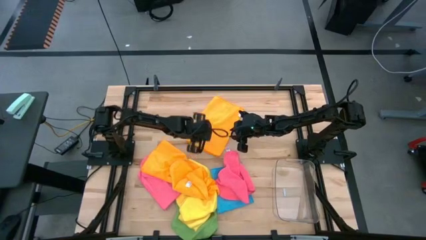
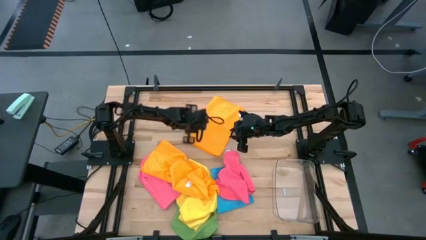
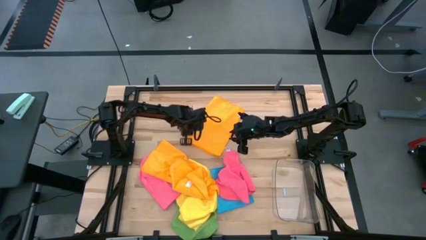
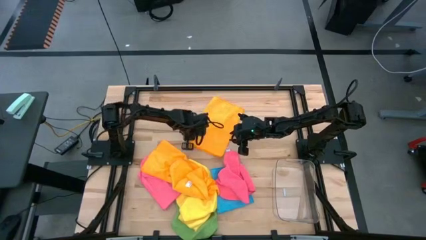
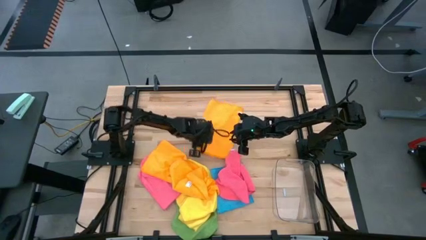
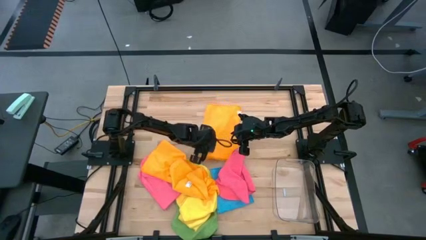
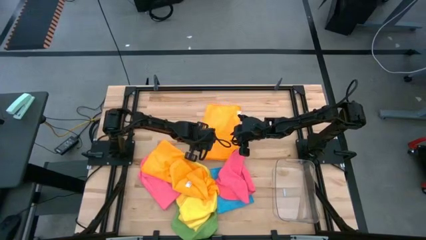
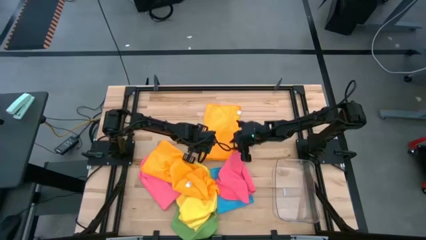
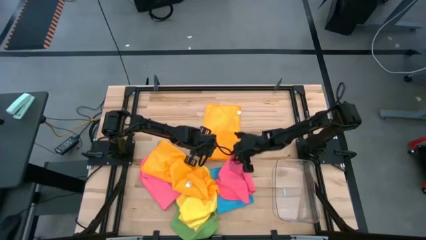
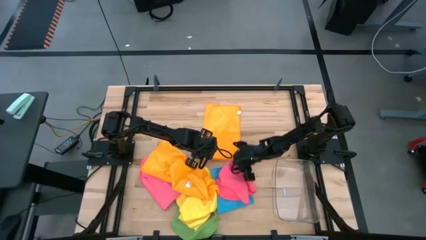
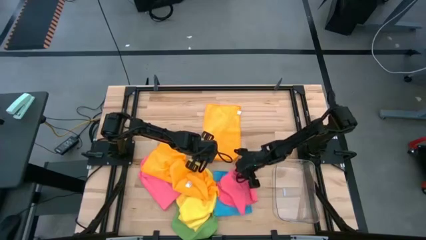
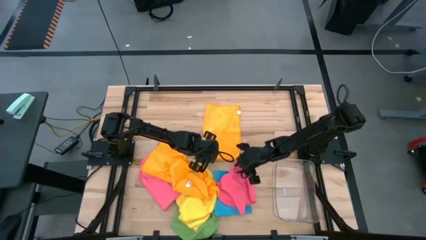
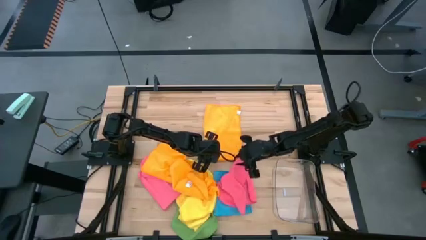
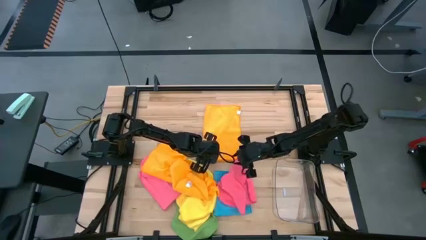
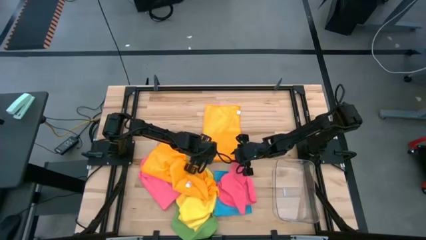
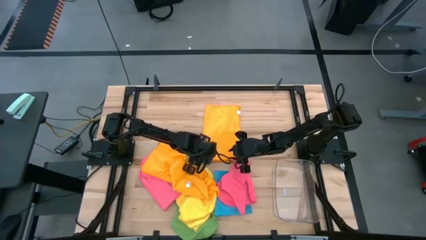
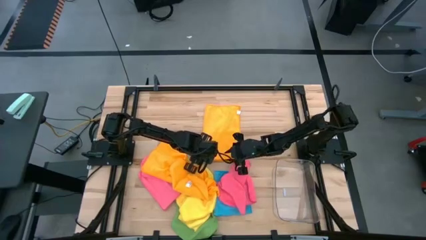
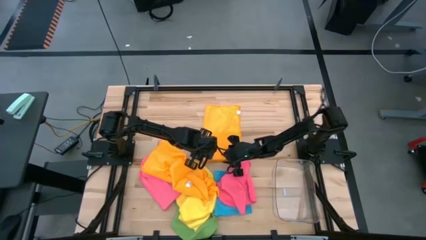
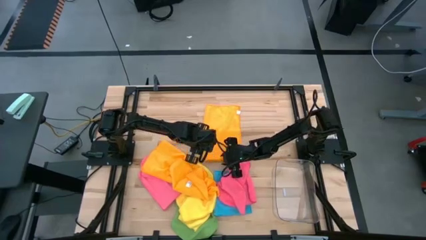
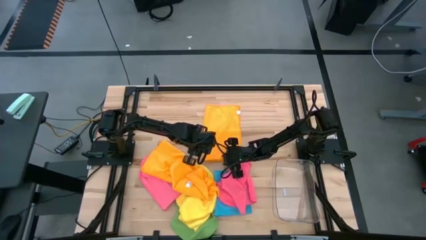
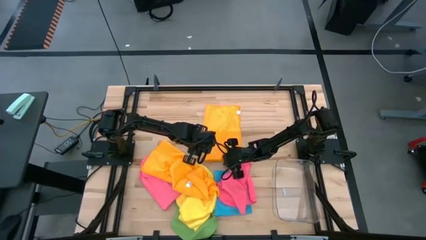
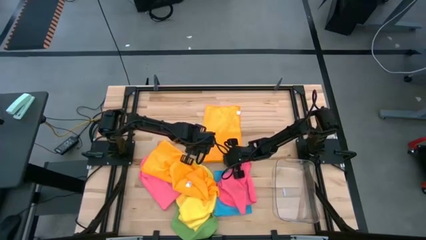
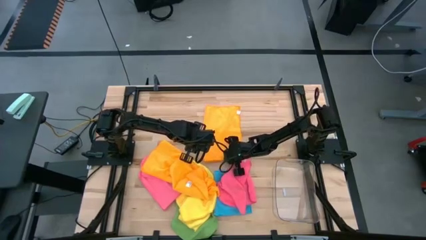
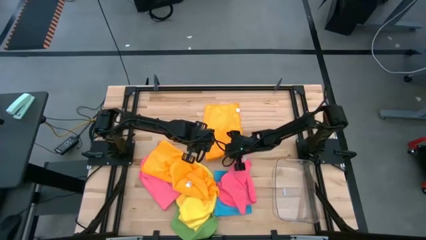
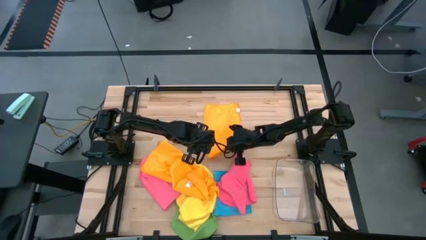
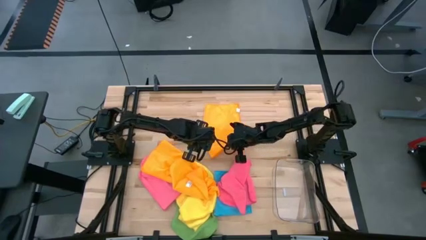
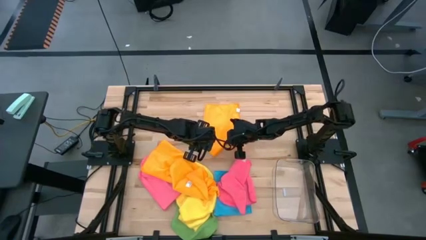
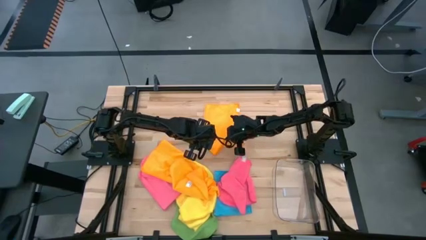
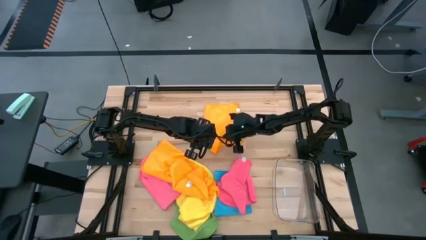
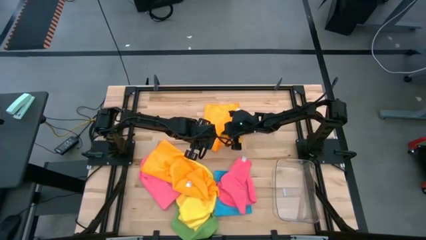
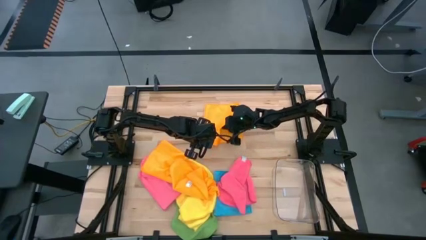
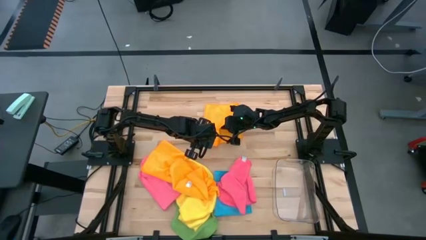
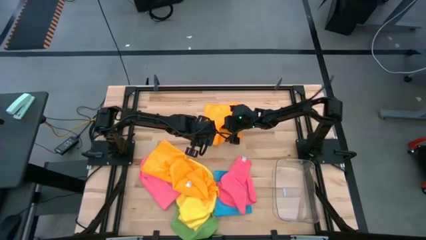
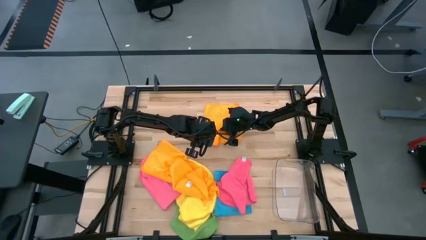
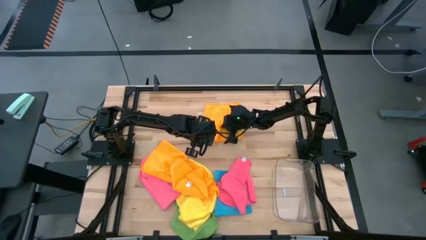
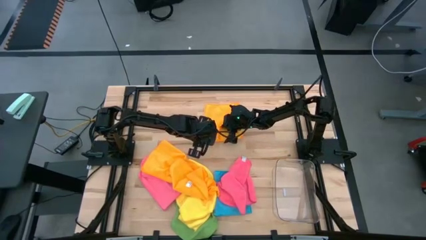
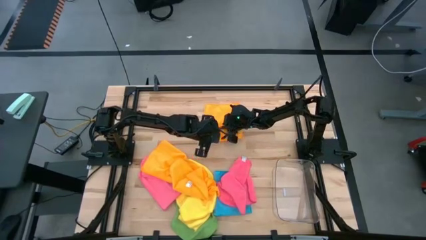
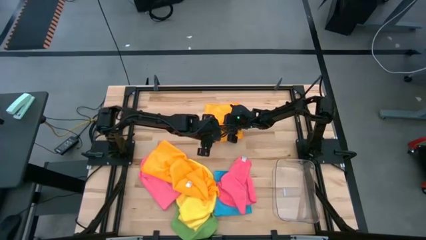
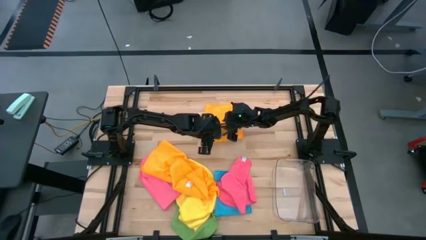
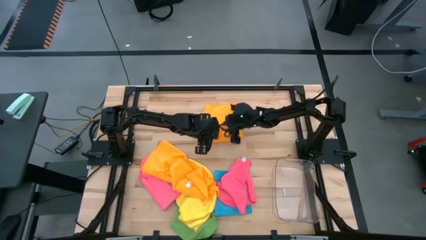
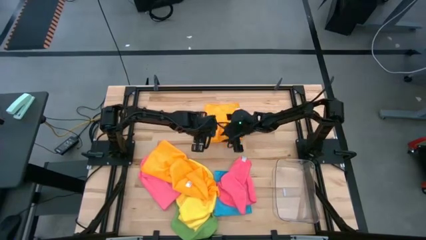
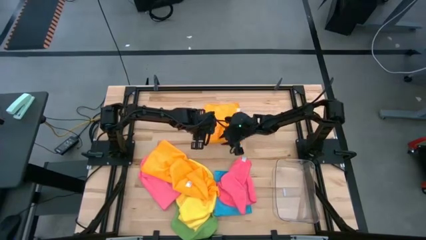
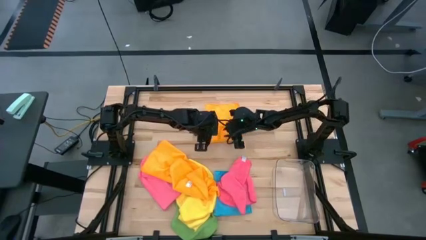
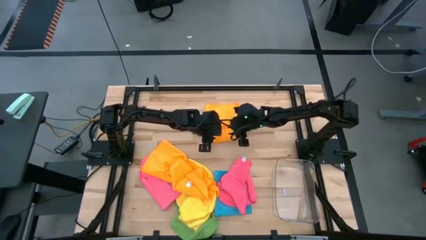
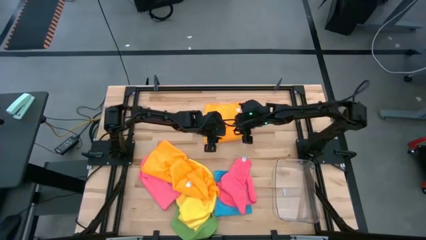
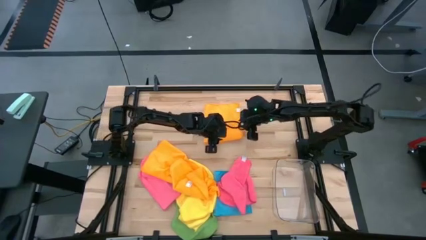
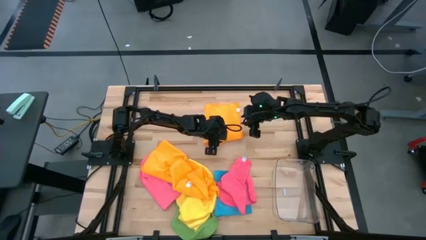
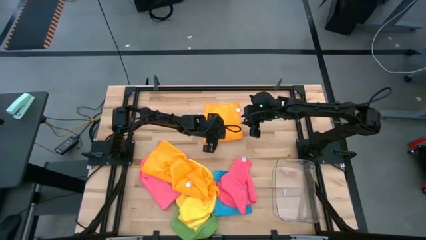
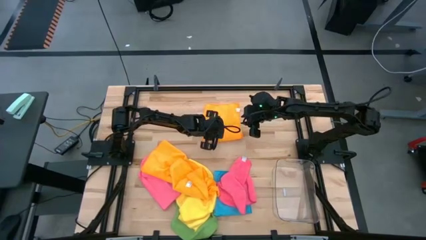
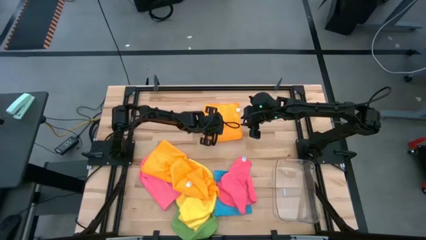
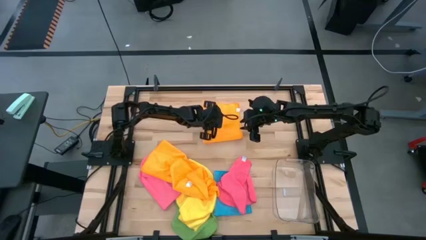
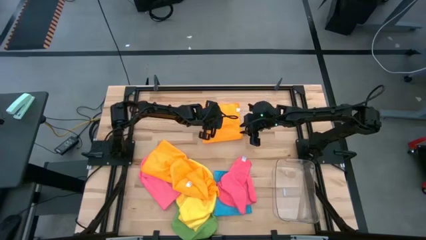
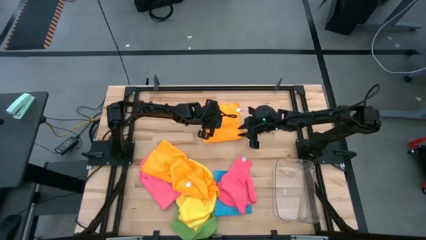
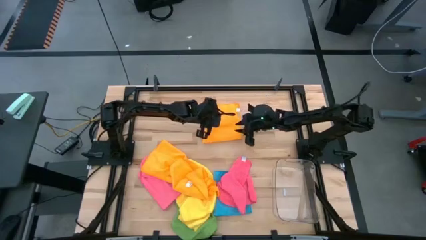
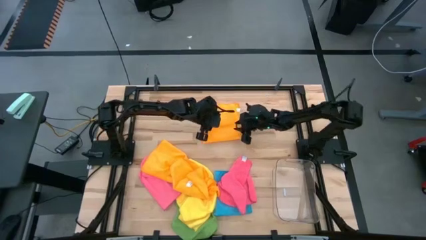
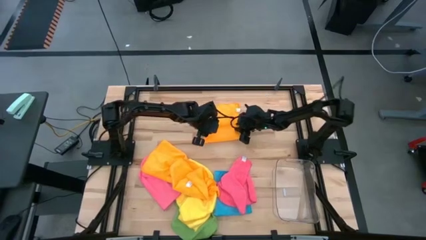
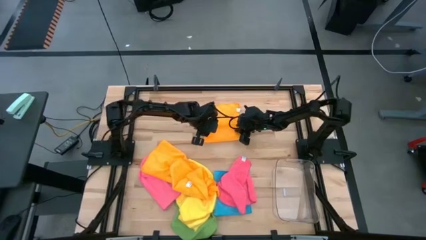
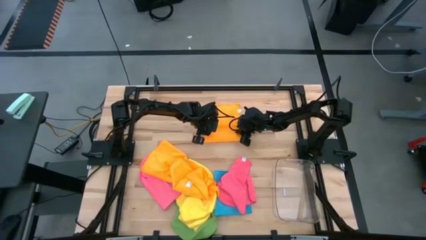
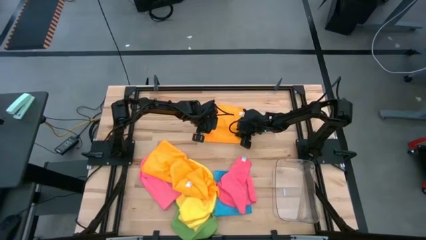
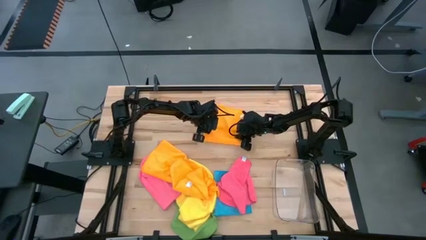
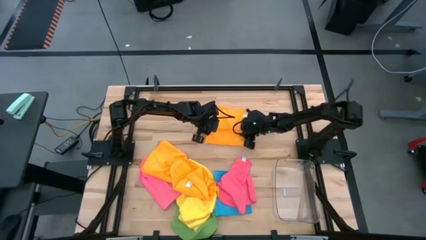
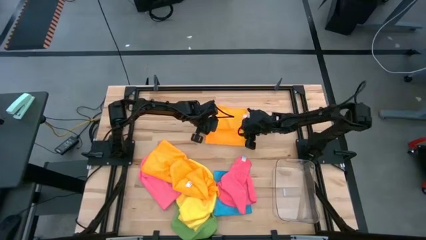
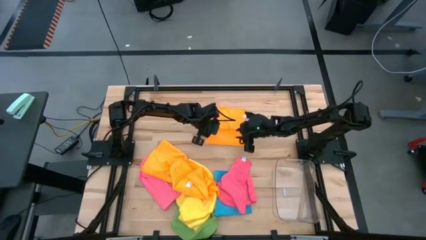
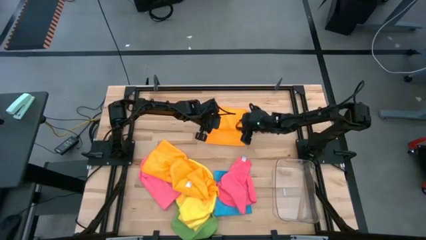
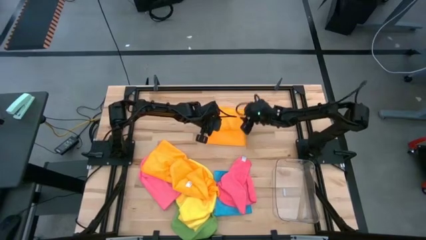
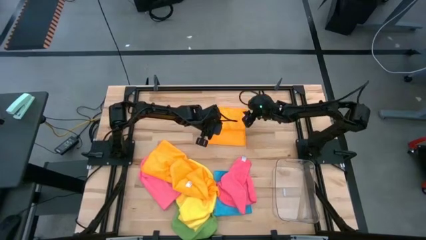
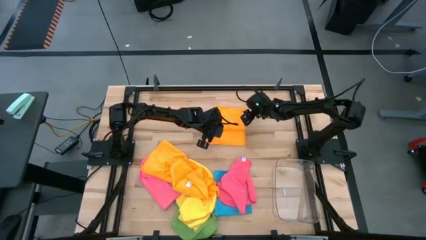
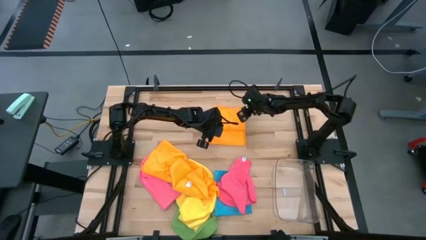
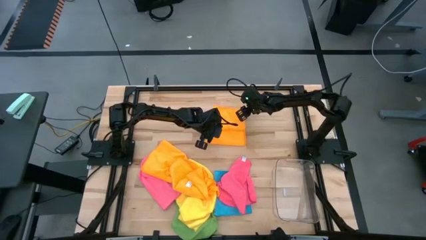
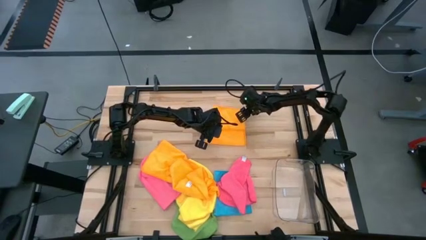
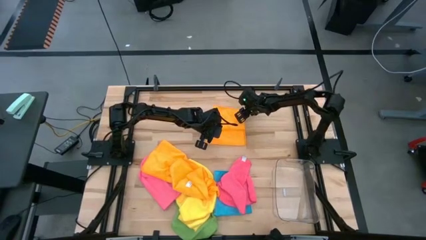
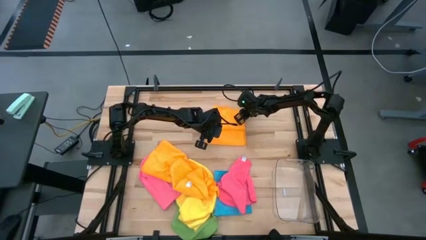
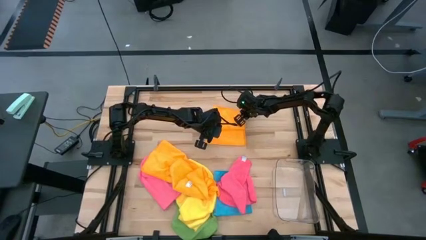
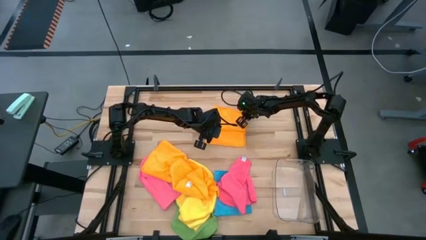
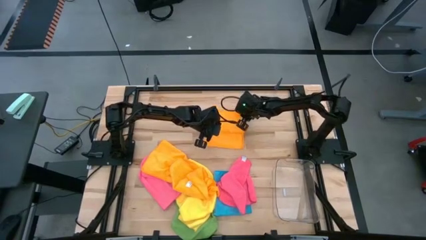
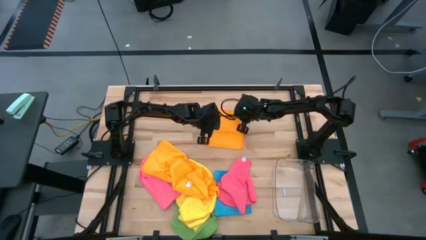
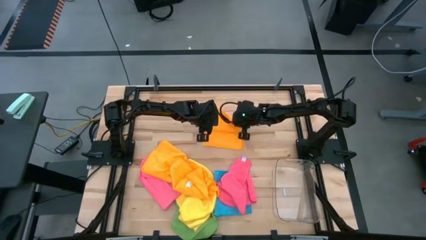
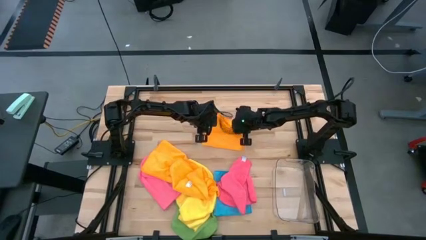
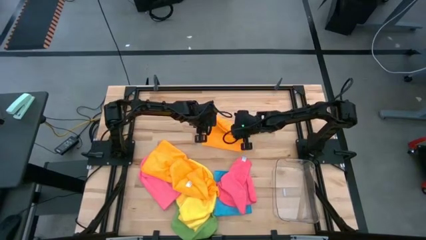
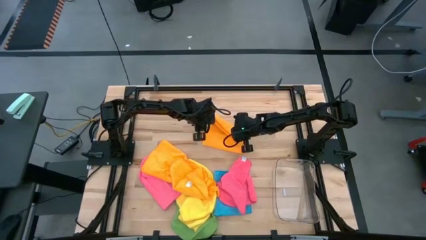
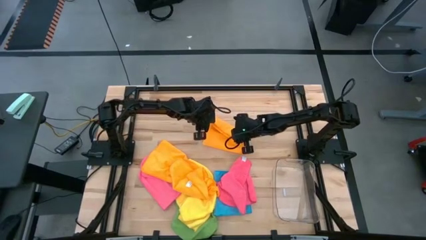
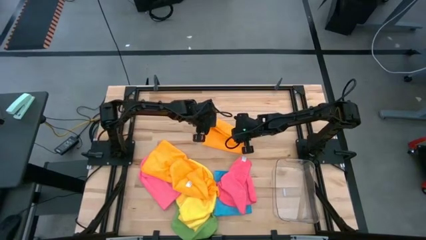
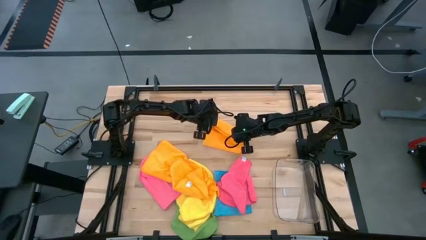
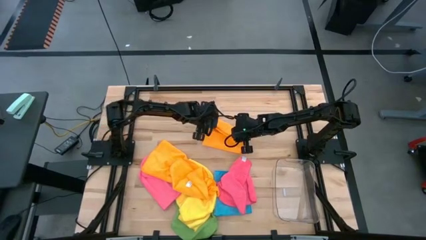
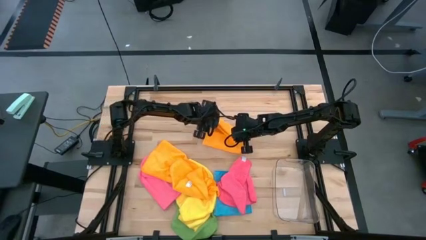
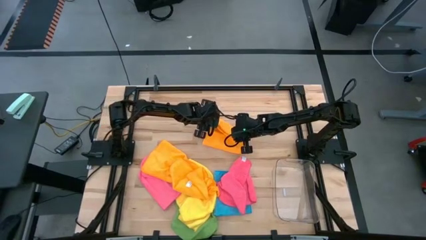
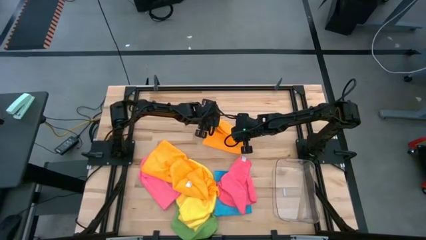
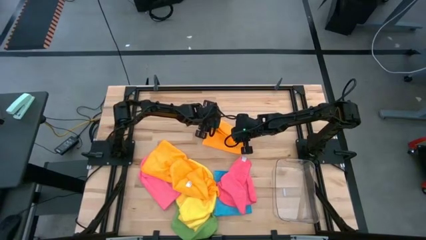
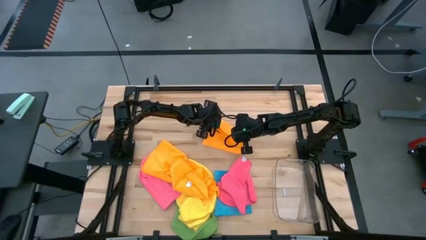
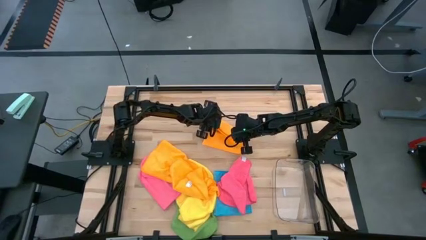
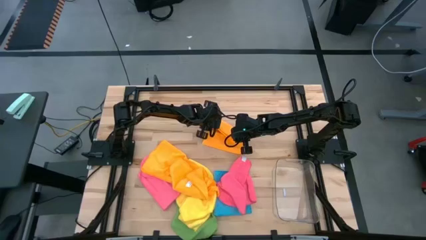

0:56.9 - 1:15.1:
Task: Fold microfiber towels
Fold the orange towel
